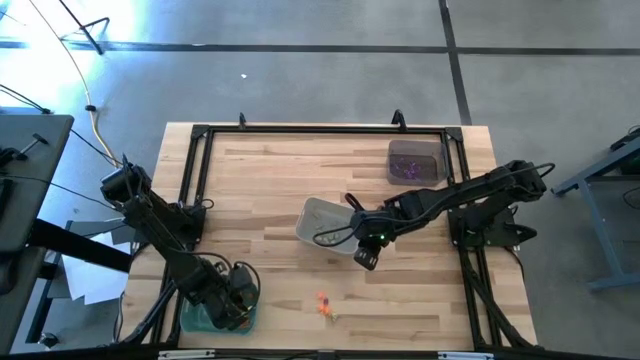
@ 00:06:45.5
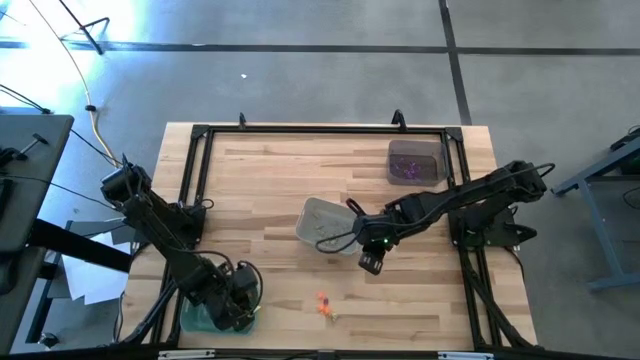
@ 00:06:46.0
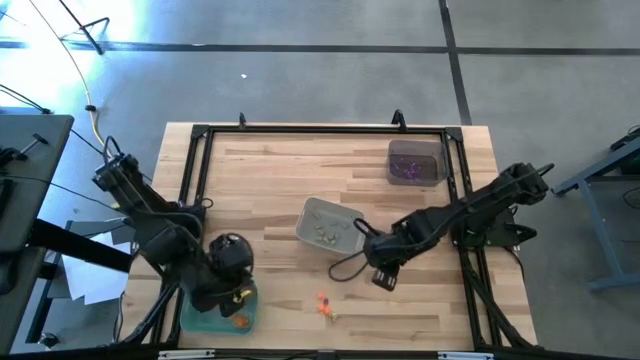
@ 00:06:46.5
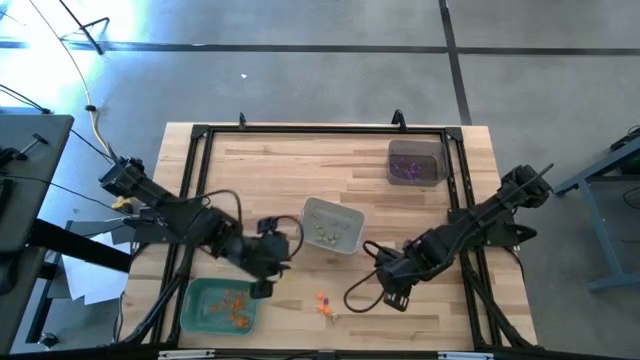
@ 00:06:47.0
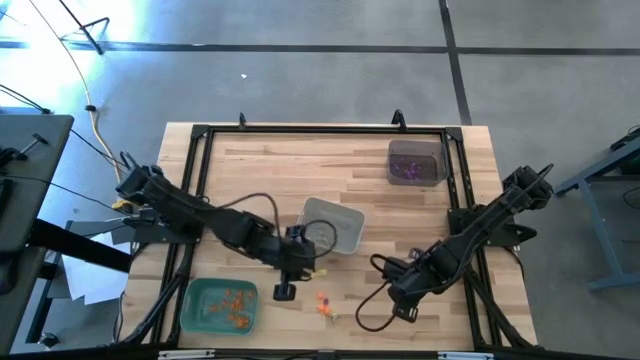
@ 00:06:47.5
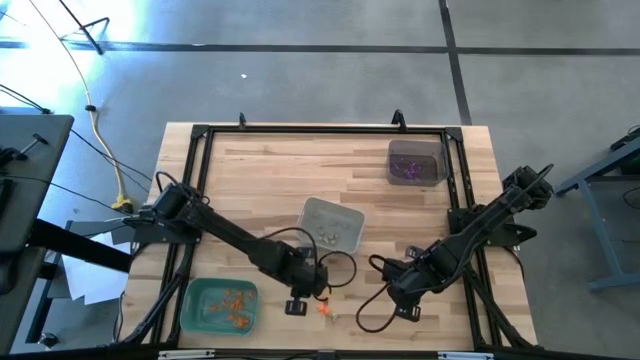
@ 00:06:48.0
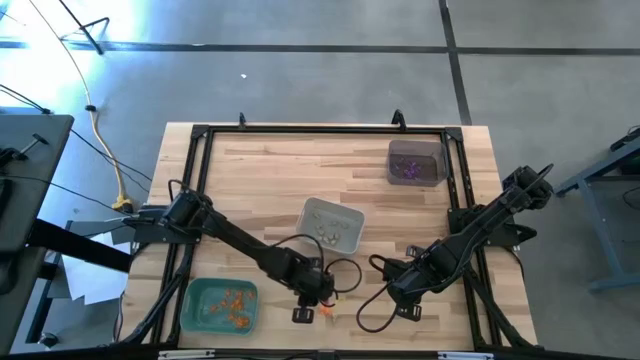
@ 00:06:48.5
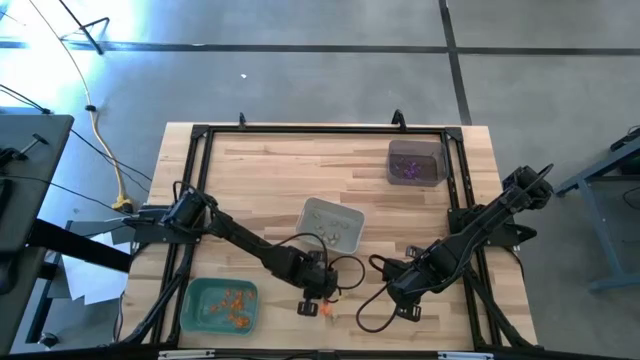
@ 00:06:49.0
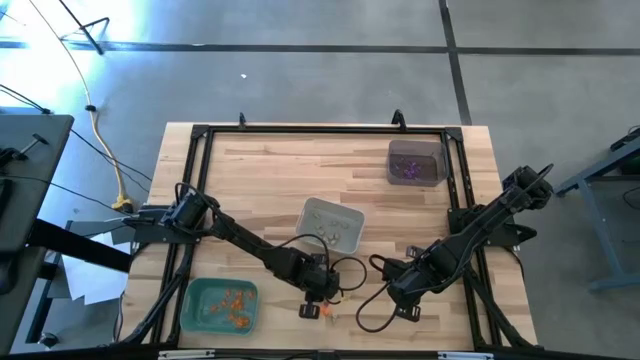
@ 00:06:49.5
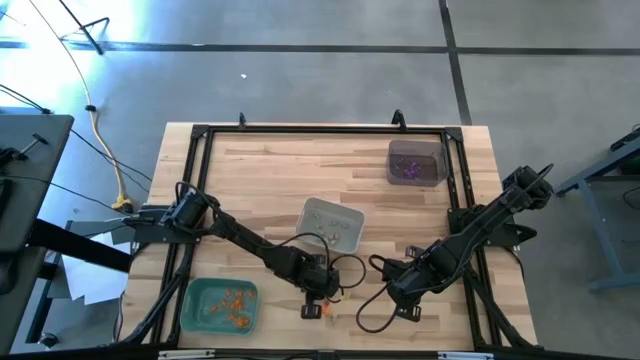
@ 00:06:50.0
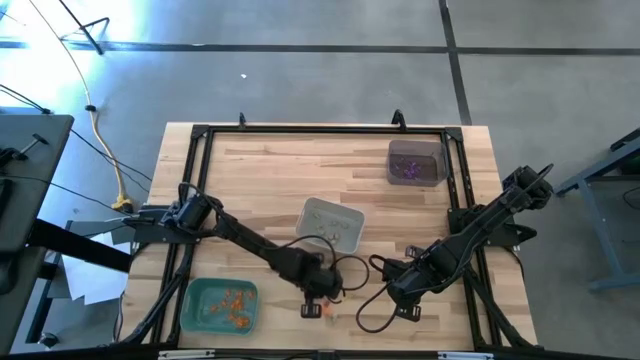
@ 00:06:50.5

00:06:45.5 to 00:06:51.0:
Task: Sort Halloween decoration
Put the orange spider toy into the green bin

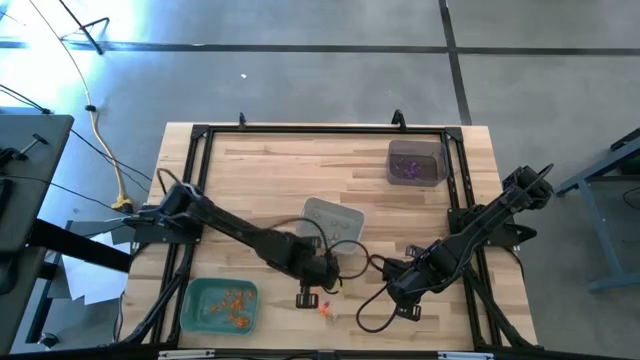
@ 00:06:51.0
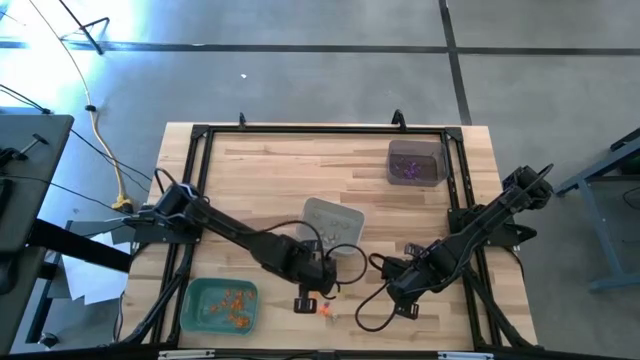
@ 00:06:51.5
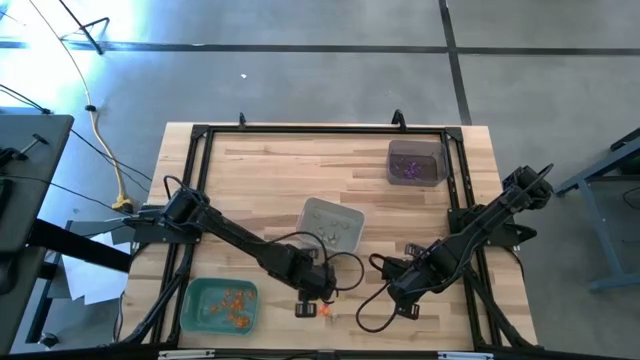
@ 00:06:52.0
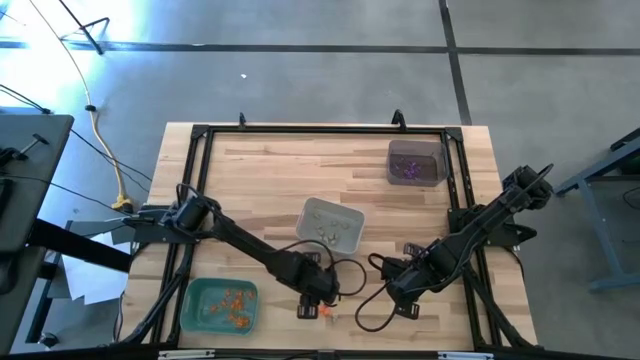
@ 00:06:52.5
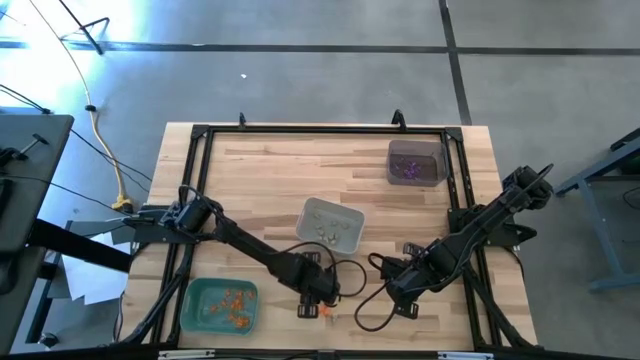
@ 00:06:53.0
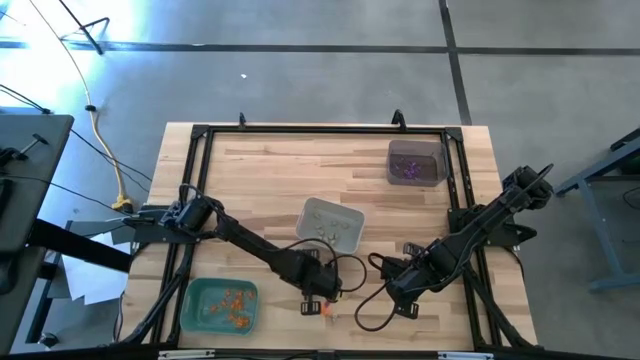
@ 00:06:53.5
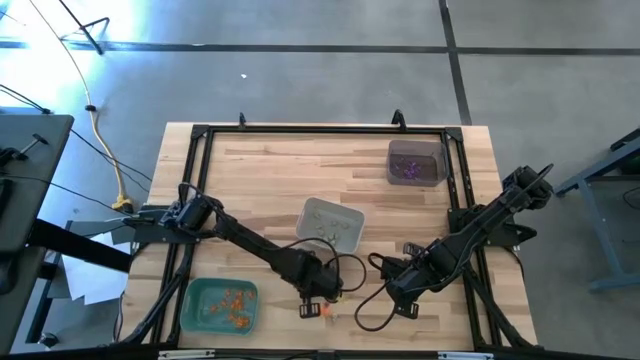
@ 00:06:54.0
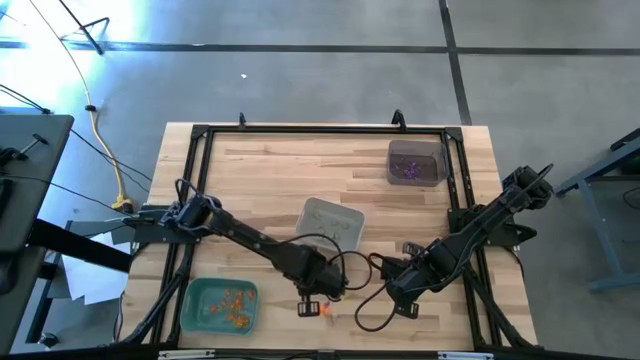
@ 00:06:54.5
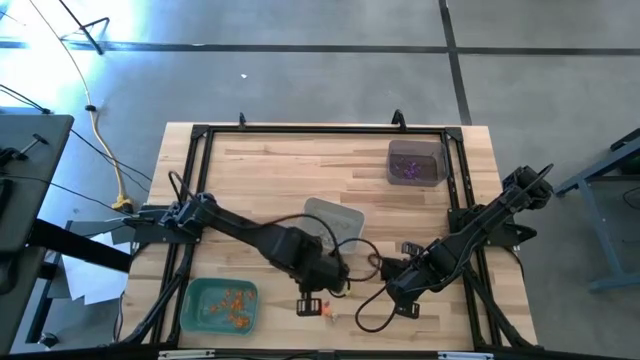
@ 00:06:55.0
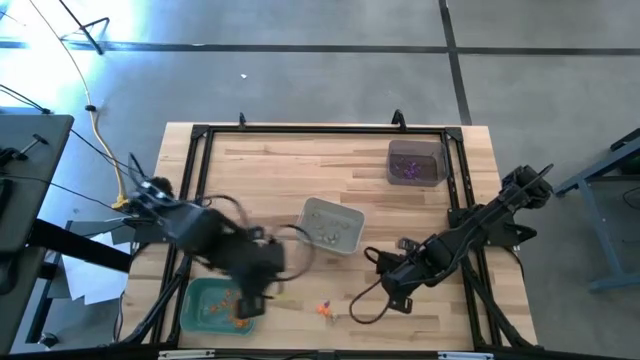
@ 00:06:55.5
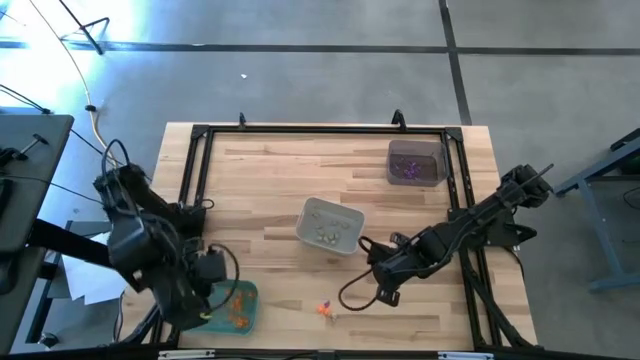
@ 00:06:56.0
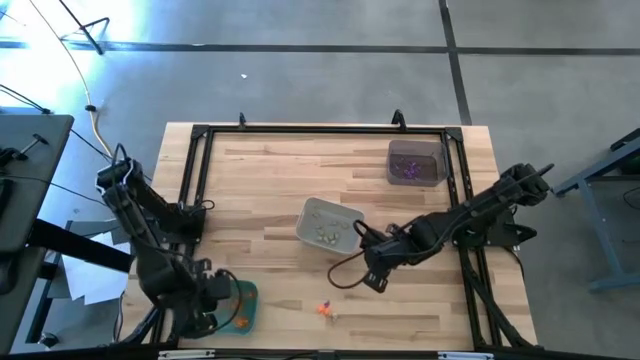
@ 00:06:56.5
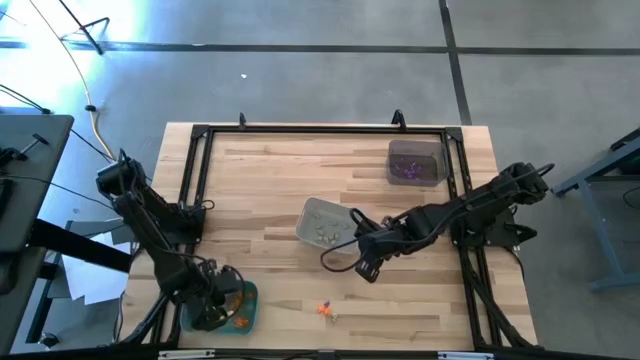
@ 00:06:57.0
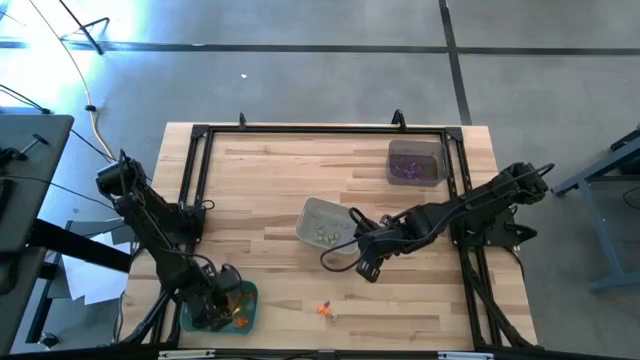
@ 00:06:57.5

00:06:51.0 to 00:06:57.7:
Put the orange spider toy into the green bin

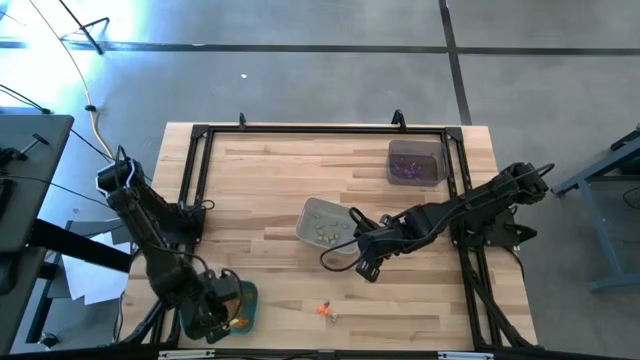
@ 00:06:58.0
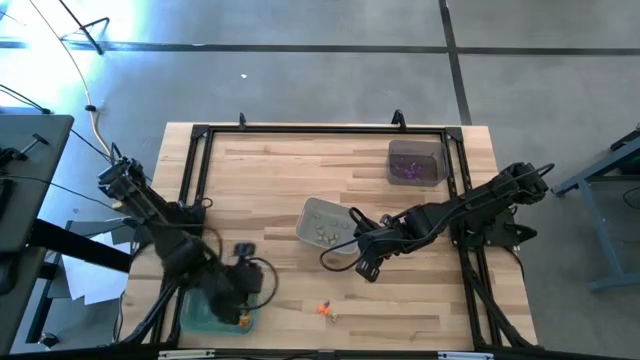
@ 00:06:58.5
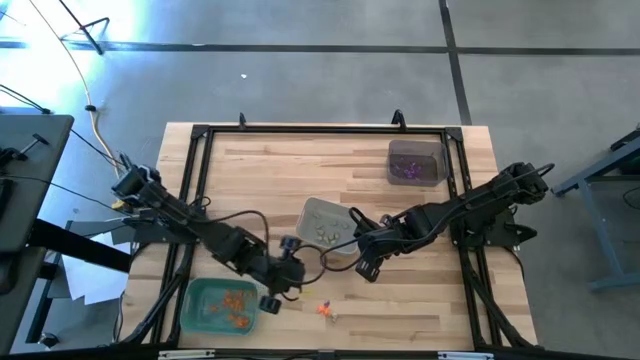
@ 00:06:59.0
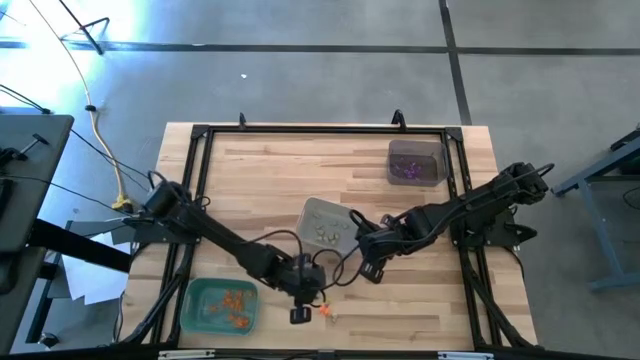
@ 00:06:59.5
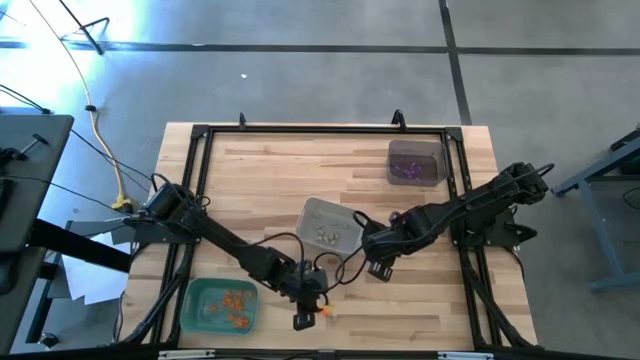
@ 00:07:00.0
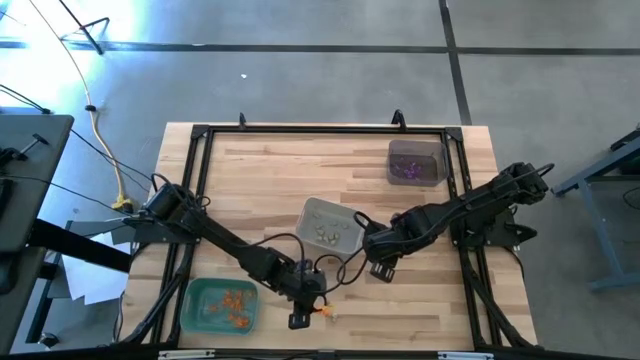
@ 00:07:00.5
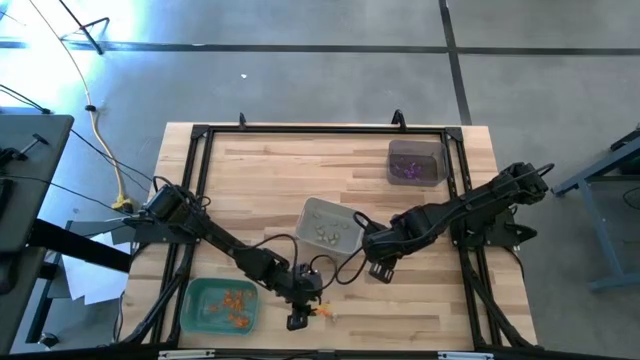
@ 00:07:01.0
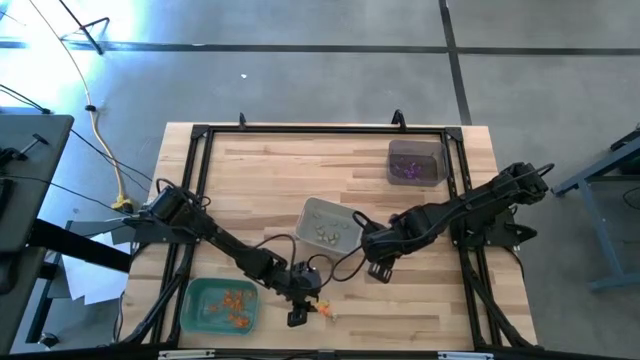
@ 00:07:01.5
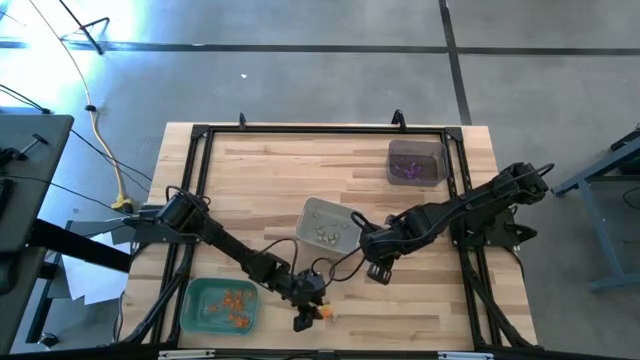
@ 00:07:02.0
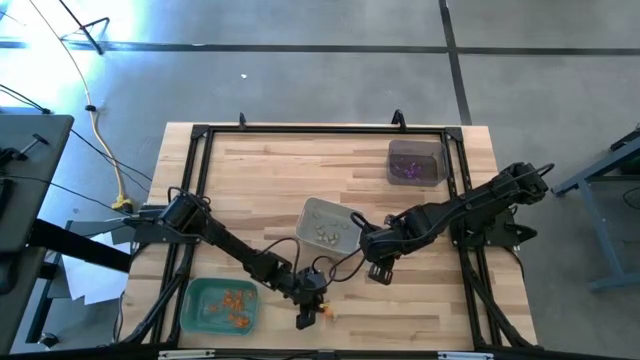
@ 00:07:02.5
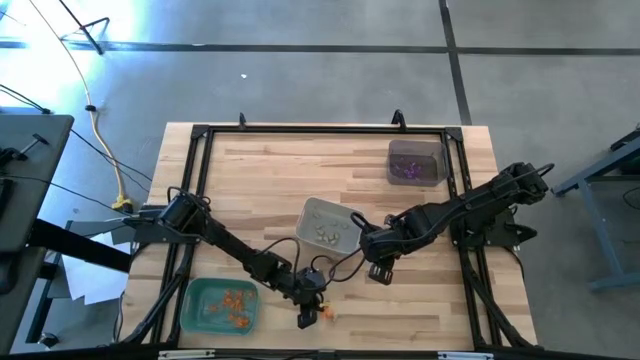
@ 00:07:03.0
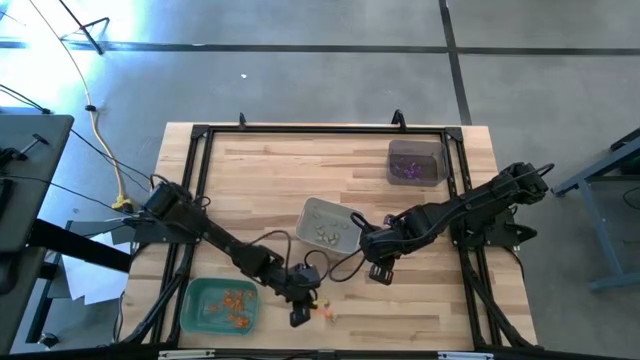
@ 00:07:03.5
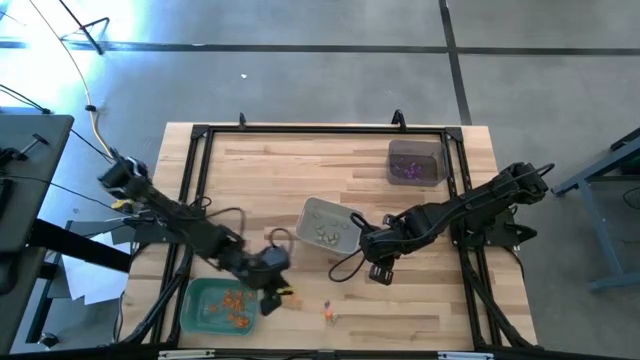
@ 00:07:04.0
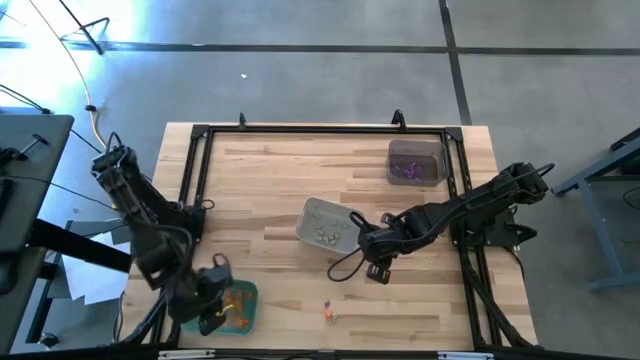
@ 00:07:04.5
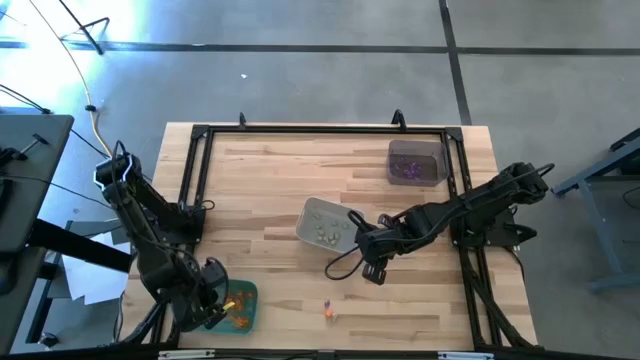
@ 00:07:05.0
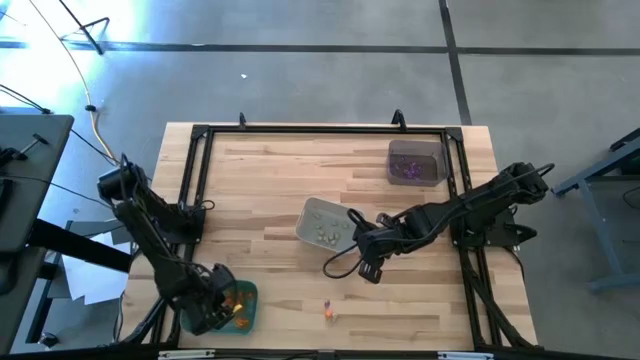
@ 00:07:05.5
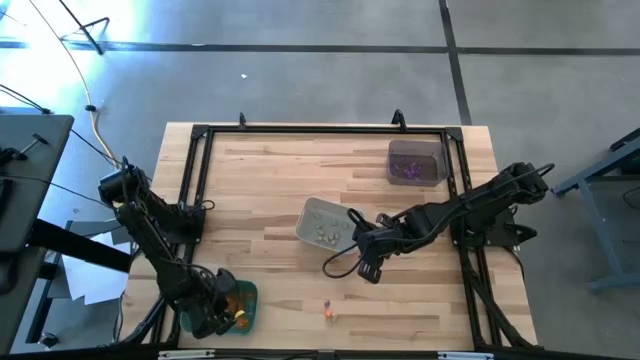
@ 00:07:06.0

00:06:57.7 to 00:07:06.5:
Put the orange spider toy into the green bin
